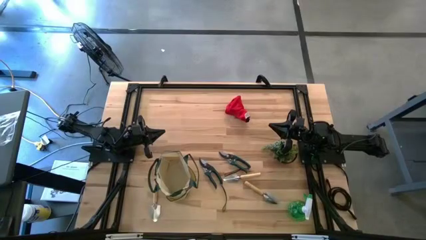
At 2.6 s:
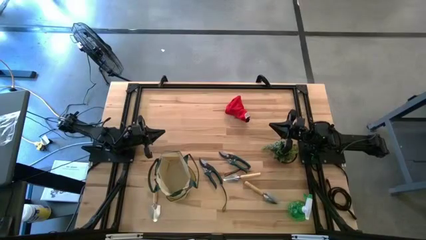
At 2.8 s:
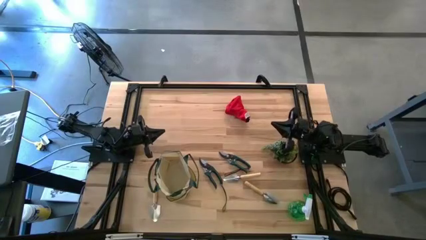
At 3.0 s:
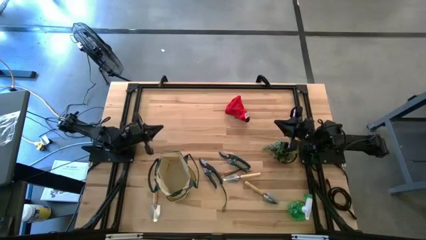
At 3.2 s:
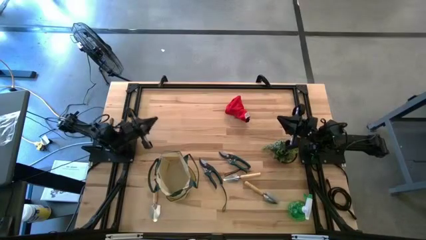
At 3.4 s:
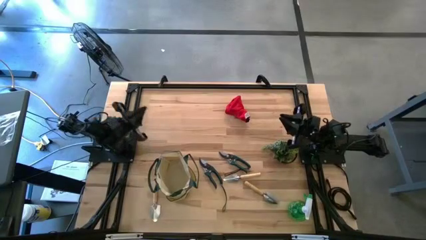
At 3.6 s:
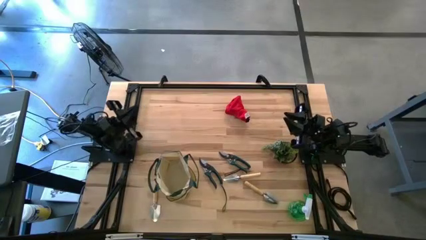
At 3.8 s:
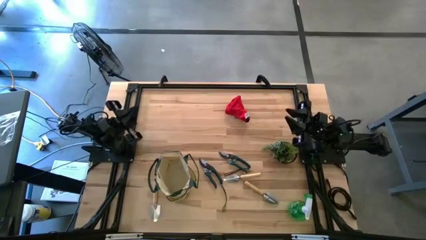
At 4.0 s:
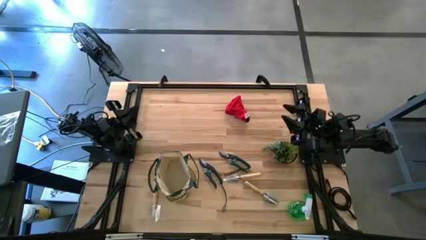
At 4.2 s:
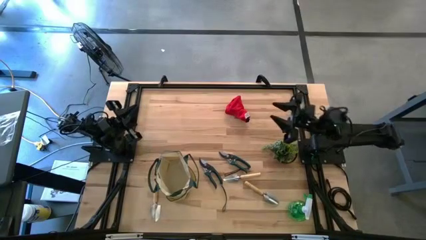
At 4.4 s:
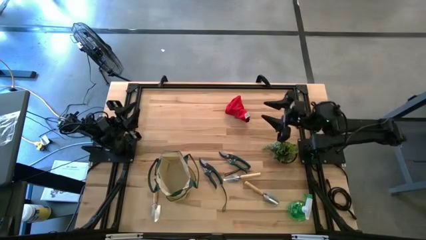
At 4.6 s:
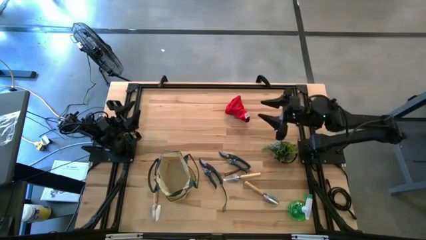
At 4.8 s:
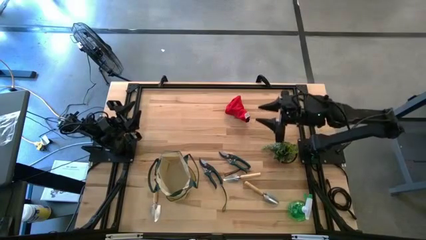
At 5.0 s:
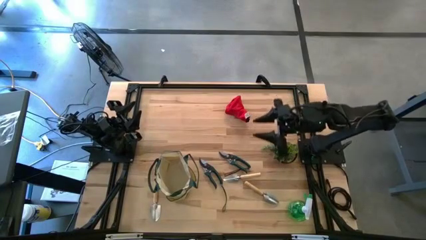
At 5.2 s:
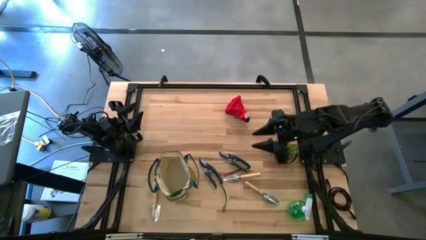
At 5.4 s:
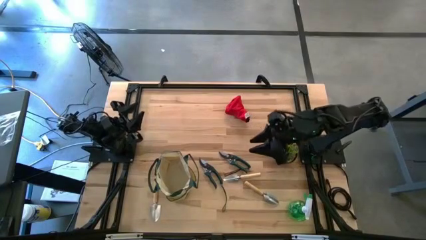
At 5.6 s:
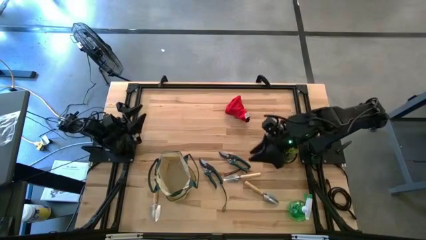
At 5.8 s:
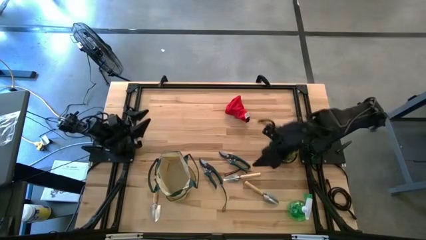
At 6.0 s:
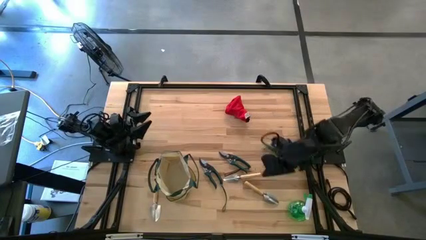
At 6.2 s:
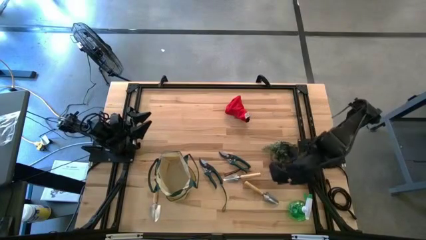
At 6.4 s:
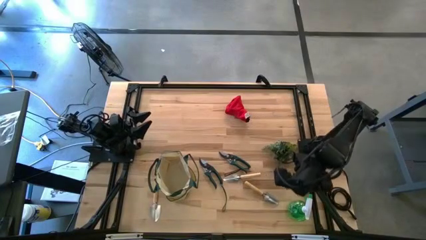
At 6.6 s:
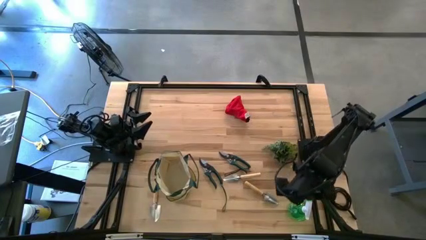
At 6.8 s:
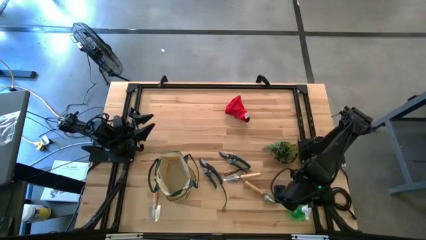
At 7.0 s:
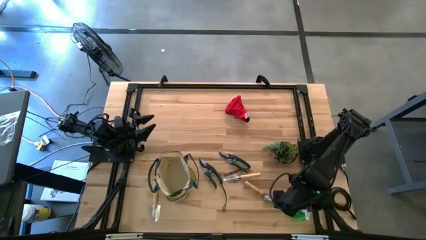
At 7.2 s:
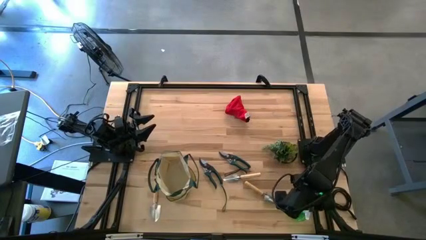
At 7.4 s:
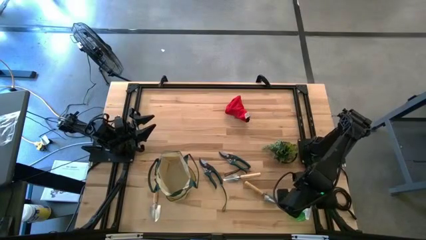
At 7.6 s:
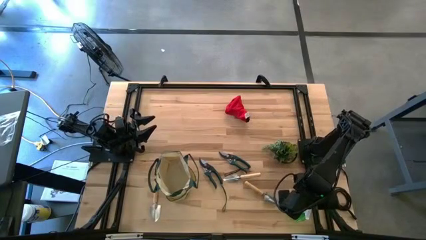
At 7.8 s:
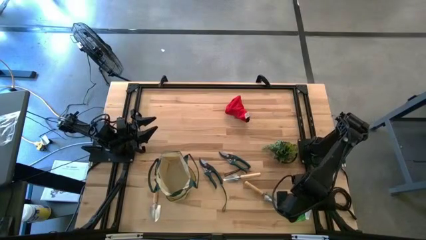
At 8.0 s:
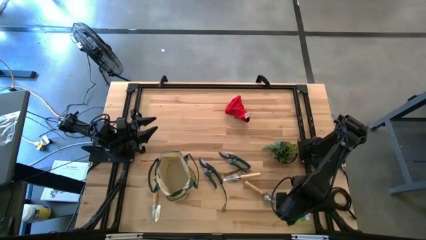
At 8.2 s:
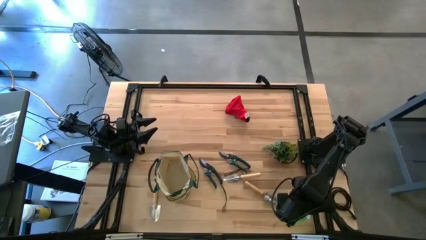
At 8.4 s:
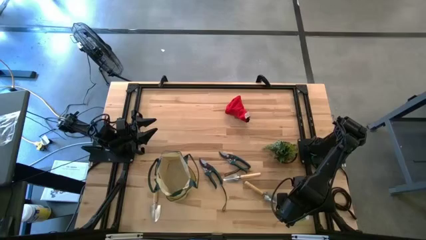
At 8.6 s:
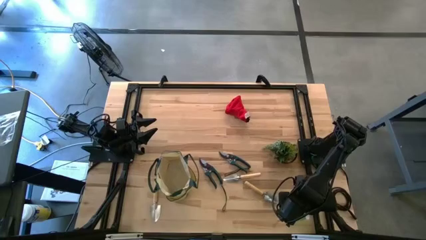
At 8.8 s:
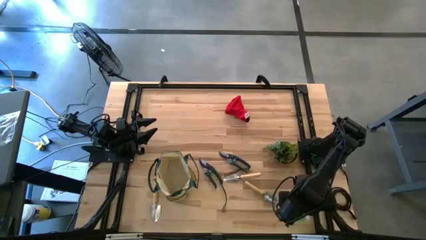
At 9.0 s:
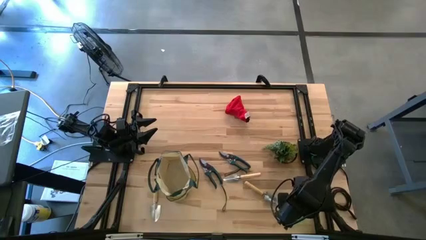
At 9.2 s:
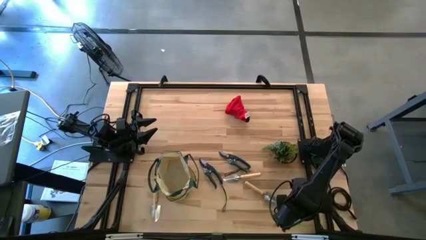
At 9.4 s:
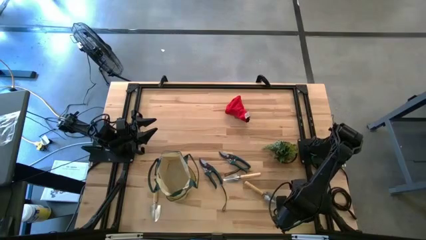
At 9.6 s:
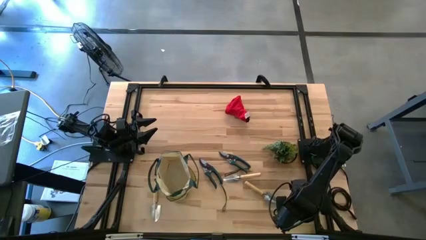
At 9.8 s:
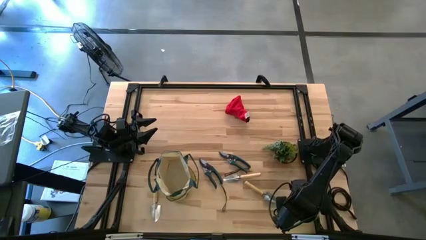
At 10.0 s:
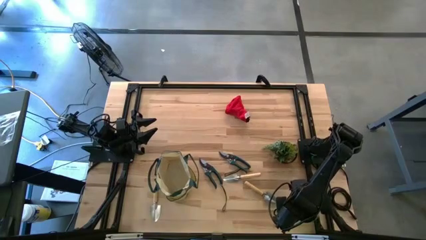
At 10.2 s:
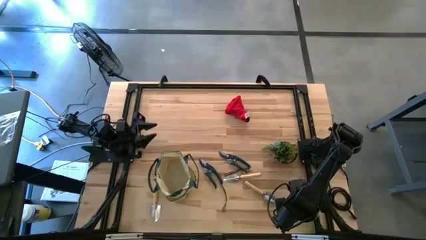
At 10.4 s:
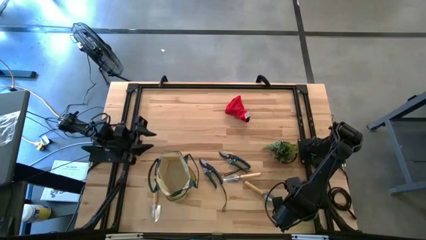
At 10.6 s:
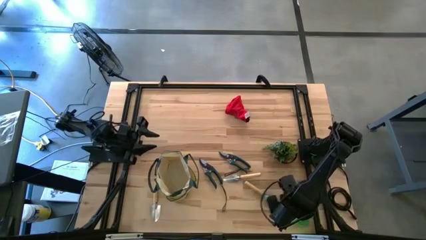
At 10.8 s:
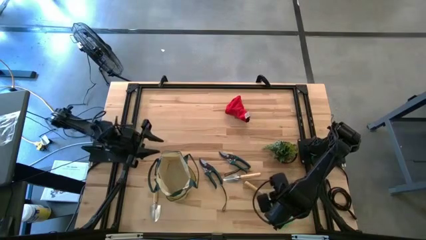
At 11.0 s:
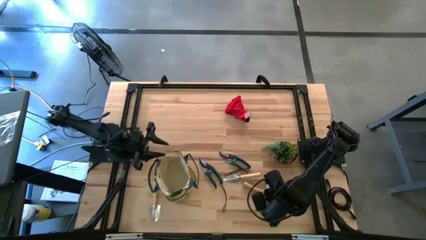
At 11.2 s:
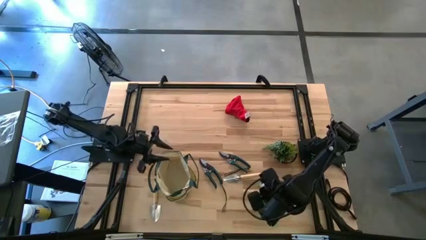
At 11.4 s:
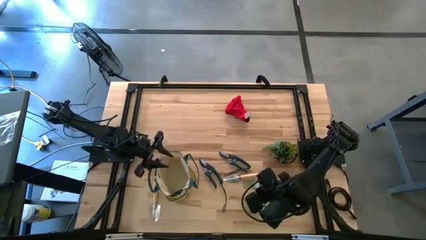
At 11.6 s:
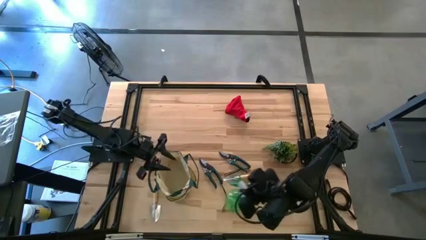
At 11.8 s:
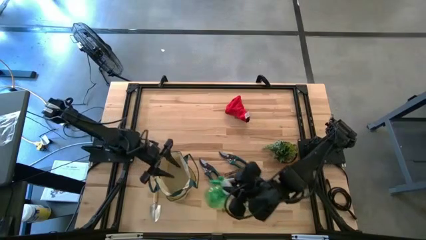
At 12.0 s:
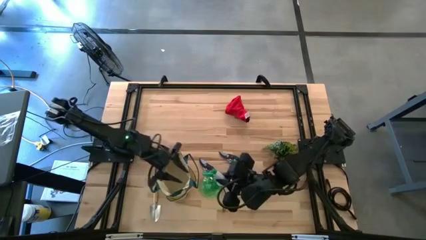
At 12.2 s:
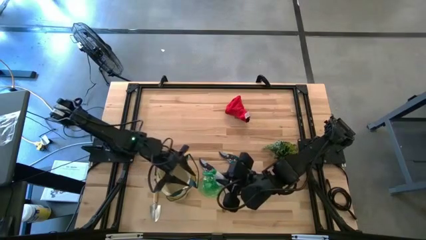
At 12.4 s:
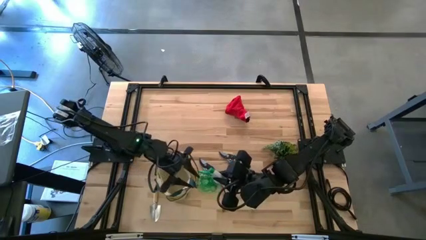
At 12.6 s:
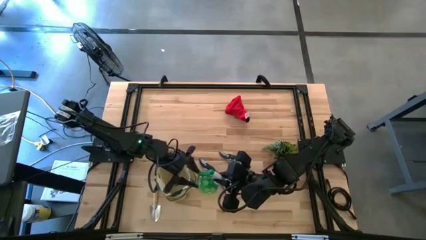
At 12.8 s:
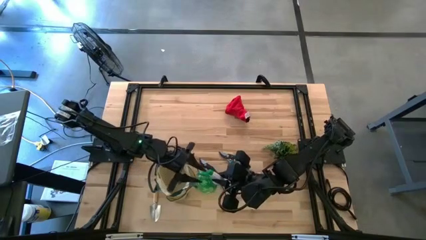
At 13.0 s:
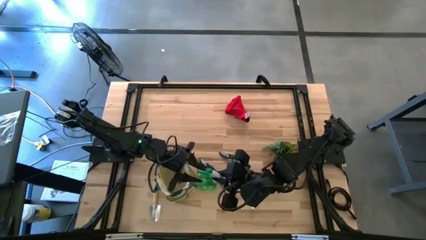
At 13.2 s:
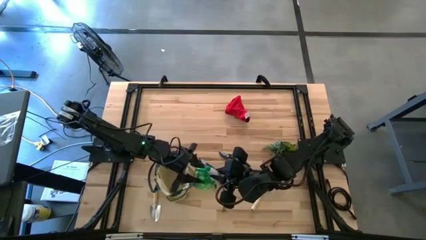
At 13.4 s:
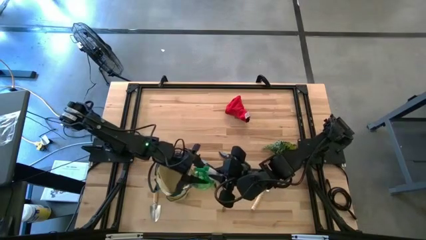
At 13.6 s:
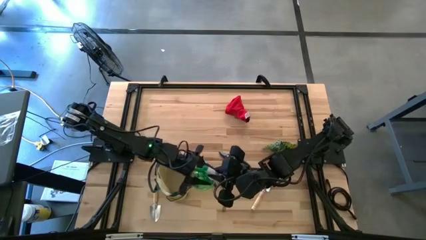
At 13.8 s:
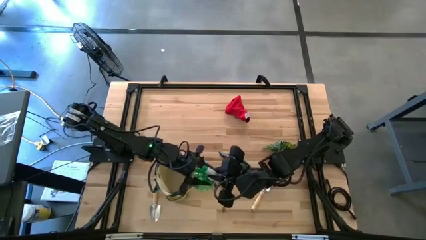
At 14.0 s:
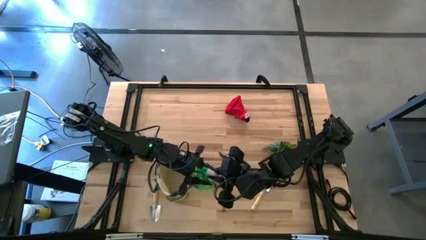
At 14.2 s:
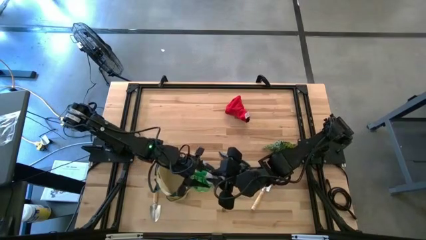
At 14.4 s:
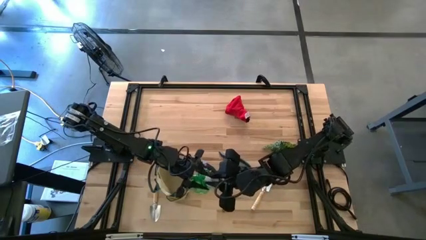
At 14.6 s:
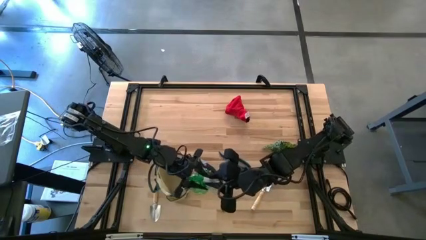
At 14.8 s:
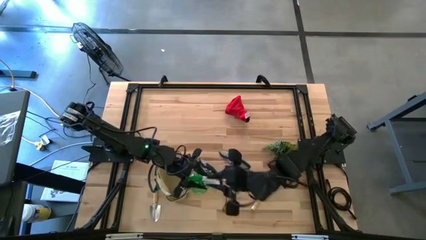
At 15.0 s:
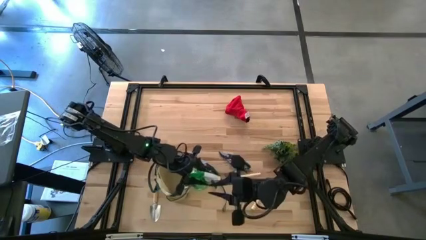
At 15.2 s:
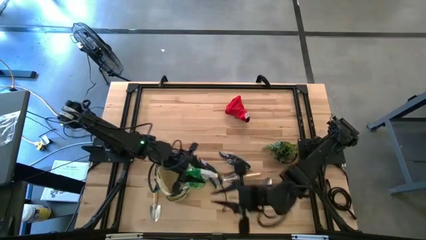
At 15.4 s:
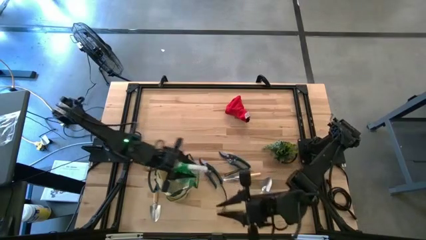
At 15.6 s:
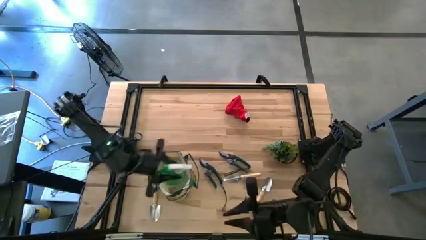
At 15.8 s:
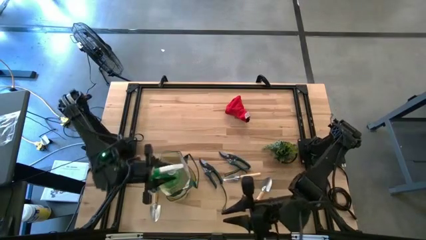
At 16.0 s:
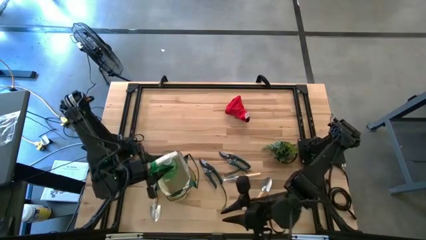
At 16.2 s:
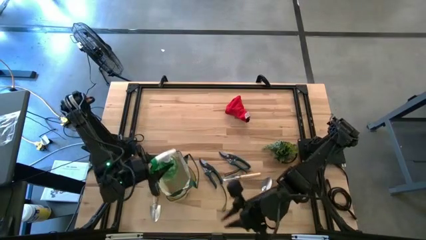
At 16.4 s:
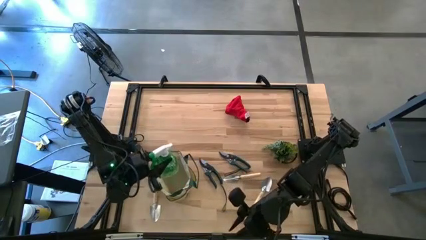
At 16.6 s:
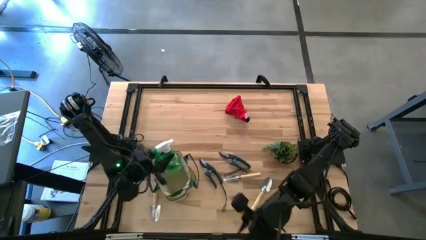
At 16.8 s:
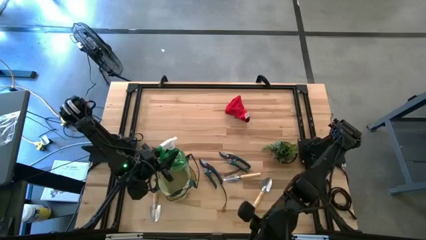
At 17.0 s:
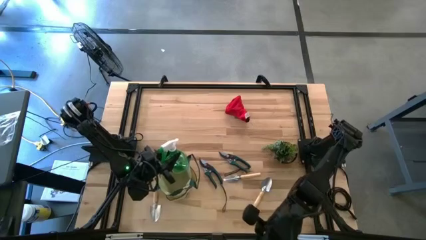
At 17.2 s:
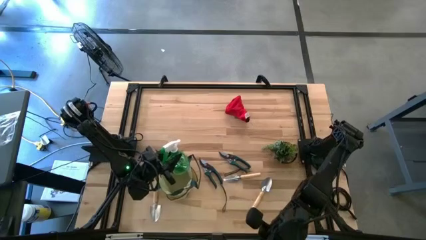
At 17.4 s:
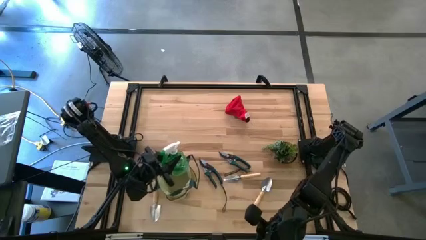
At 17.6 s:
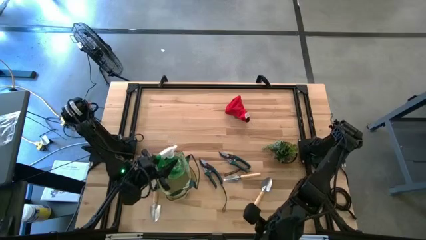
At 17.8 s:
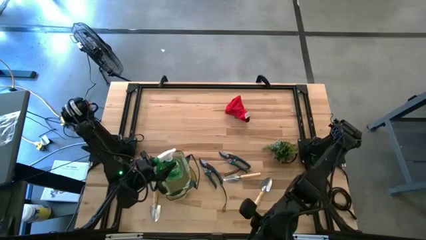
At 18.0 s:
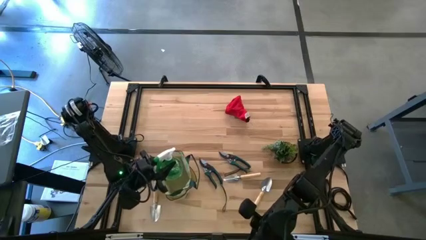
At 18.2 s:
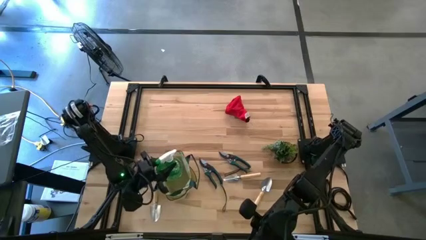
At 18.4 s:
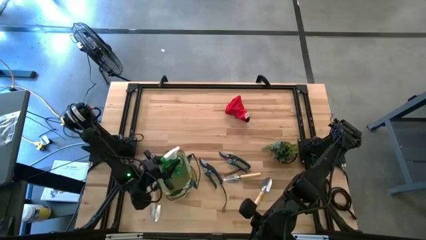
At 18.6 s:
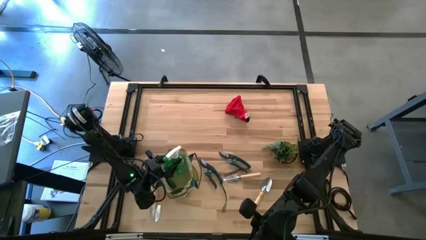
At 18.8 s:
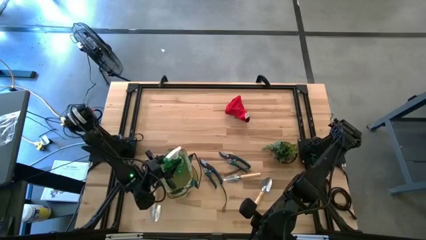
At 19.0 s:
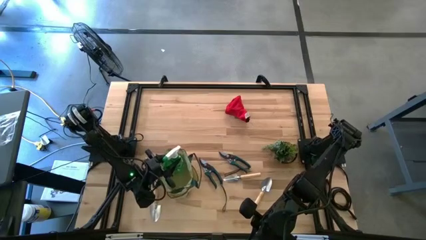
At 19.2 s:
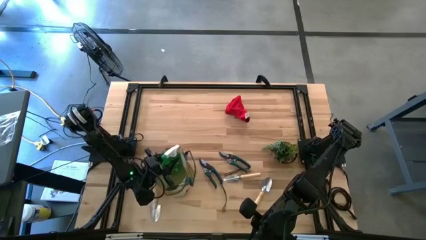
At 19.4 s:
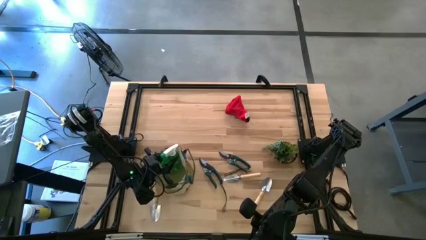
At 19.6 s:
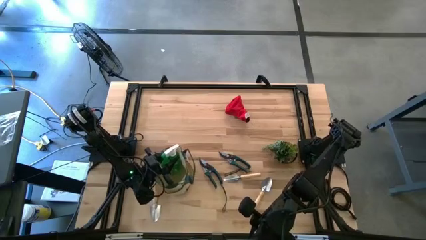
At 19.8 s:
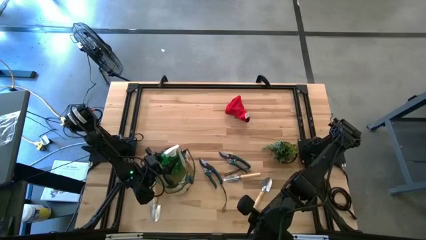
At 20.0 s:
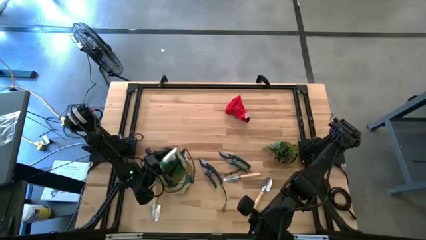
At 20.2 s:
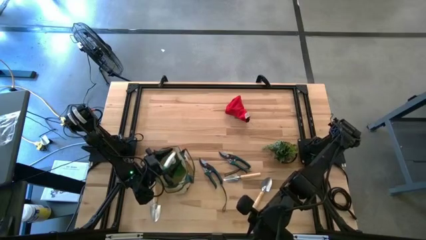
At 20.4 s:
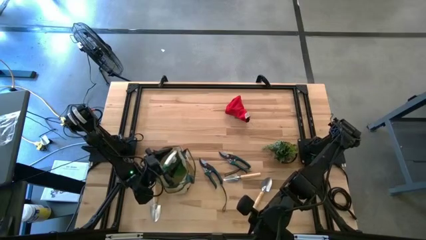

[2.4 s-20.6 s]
Task: Pick & Place Garden tools in Gardening bag
Put the green spray bottle into the brown gardening bag
